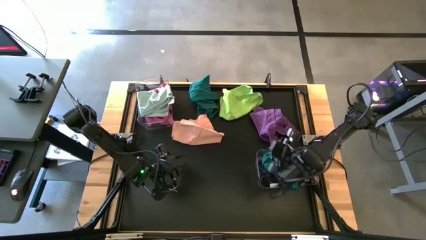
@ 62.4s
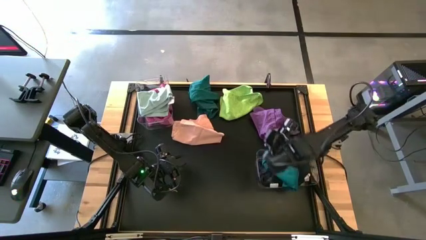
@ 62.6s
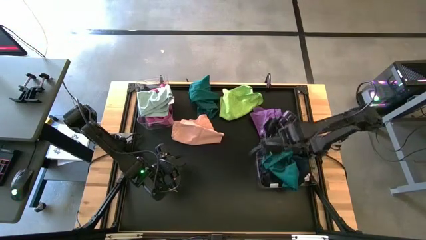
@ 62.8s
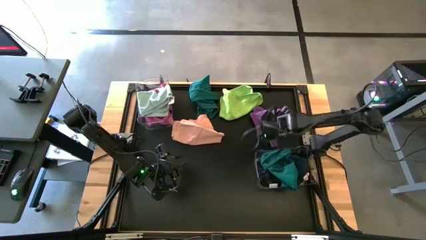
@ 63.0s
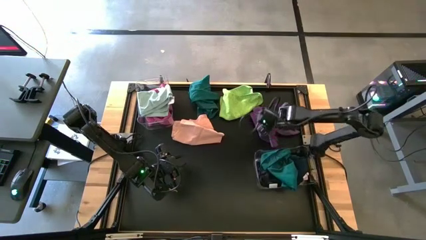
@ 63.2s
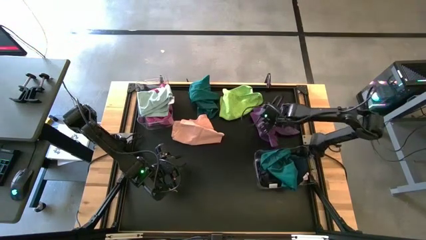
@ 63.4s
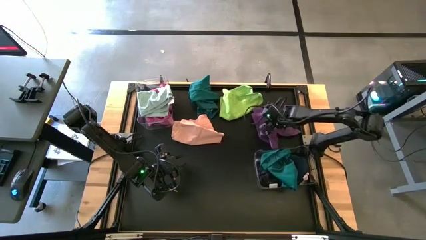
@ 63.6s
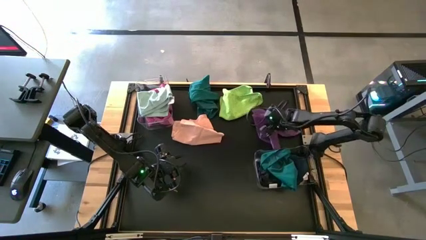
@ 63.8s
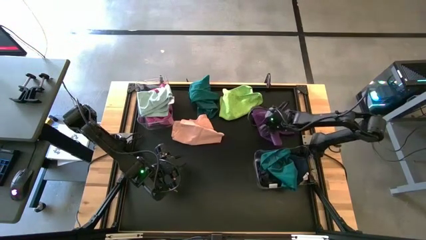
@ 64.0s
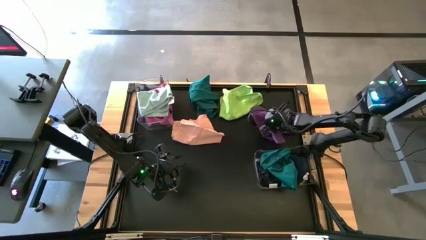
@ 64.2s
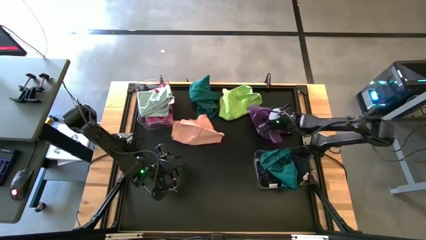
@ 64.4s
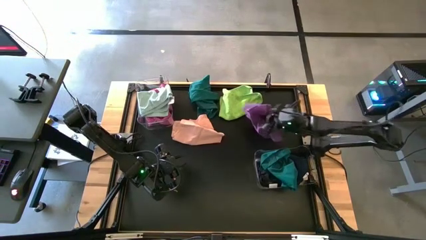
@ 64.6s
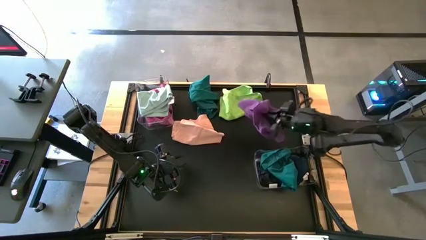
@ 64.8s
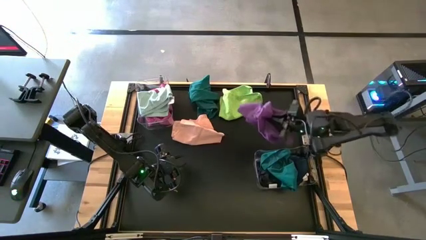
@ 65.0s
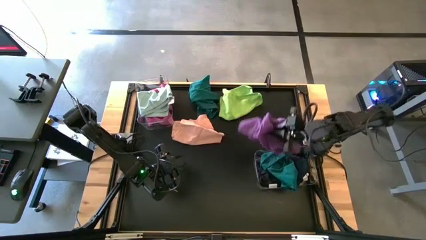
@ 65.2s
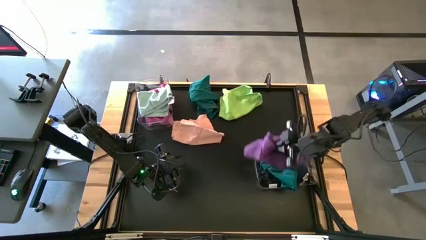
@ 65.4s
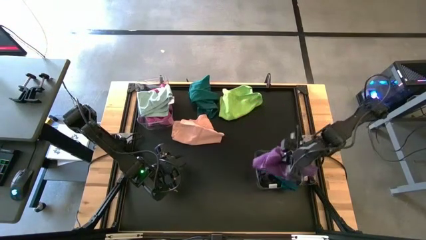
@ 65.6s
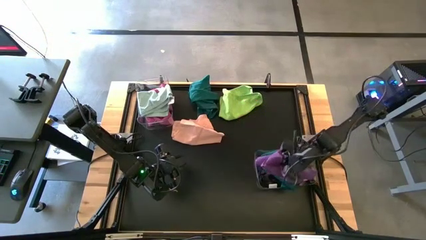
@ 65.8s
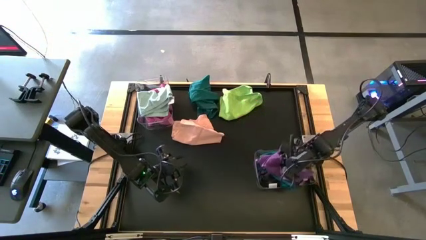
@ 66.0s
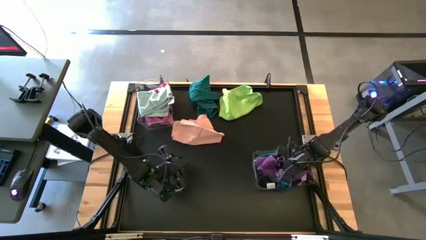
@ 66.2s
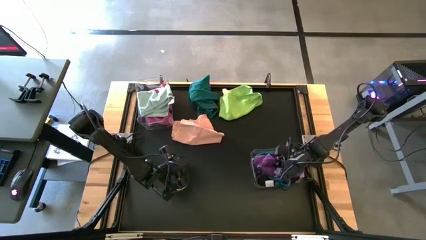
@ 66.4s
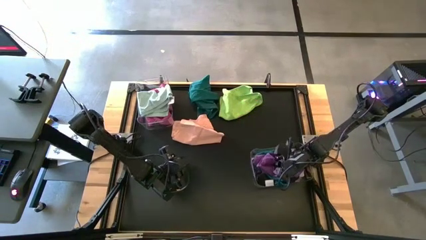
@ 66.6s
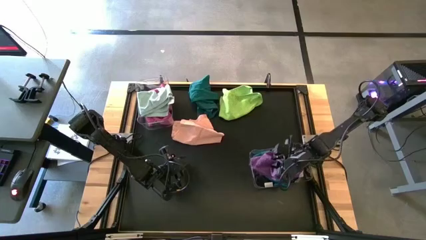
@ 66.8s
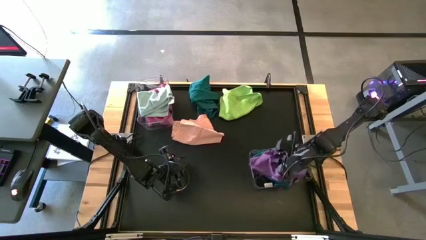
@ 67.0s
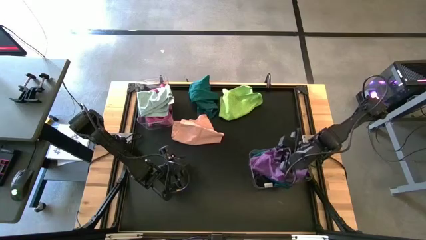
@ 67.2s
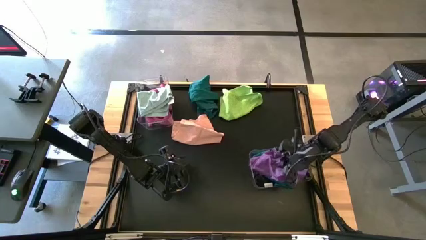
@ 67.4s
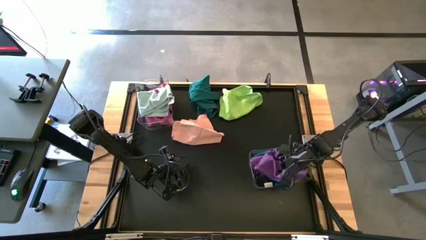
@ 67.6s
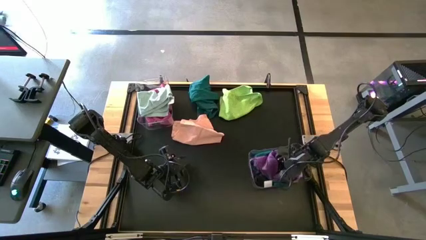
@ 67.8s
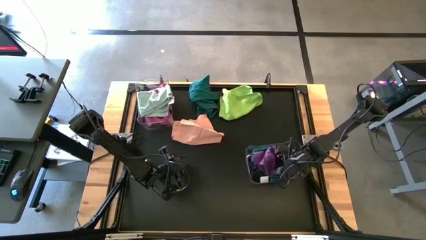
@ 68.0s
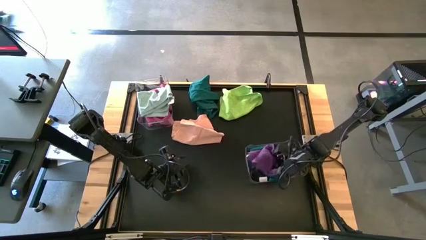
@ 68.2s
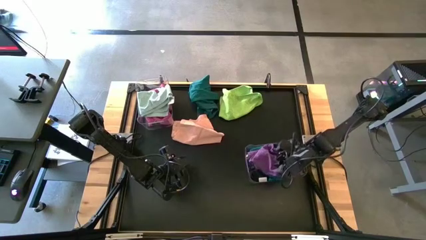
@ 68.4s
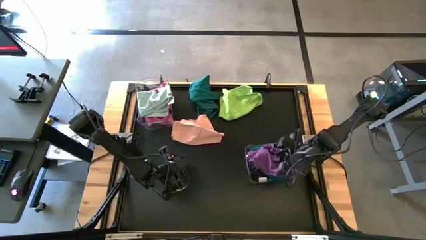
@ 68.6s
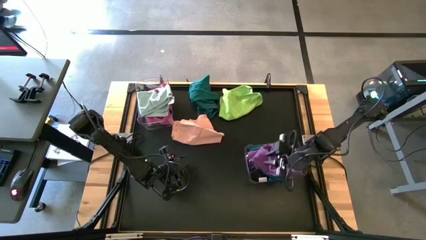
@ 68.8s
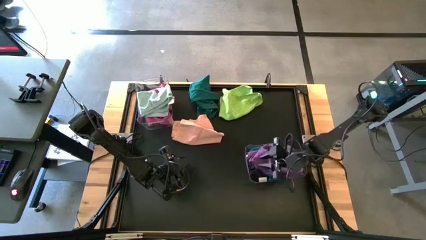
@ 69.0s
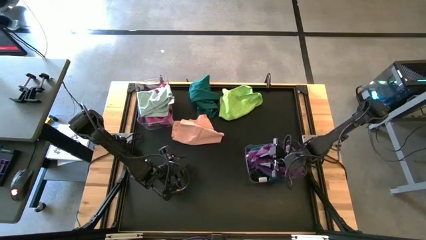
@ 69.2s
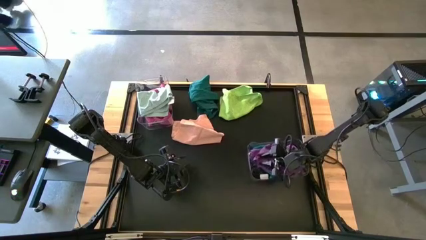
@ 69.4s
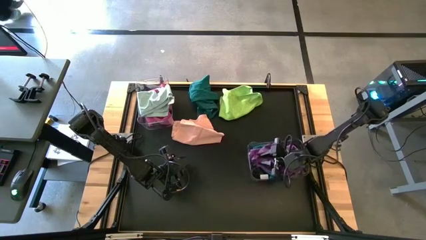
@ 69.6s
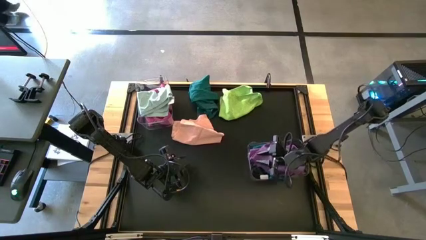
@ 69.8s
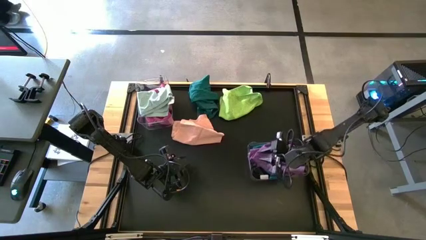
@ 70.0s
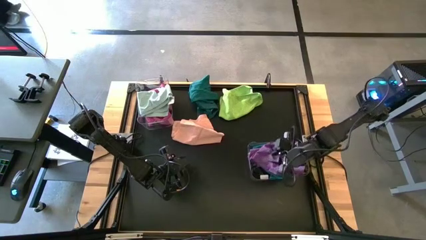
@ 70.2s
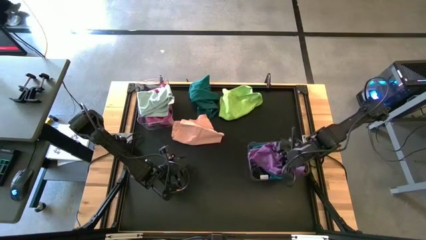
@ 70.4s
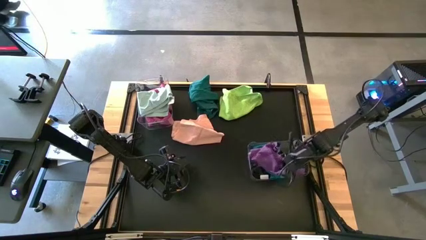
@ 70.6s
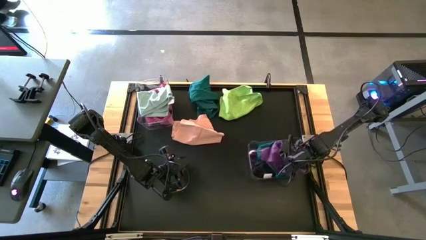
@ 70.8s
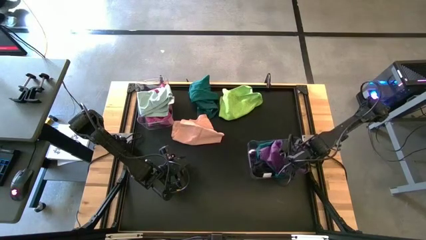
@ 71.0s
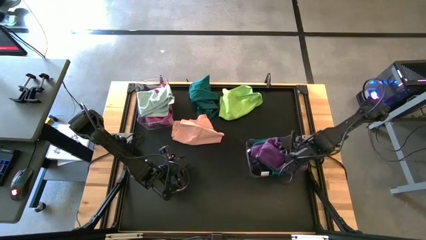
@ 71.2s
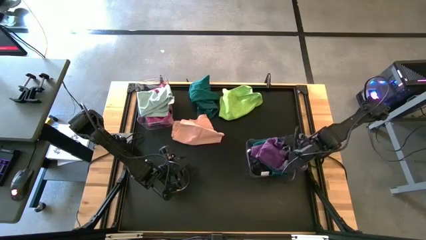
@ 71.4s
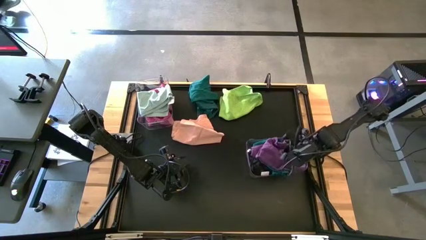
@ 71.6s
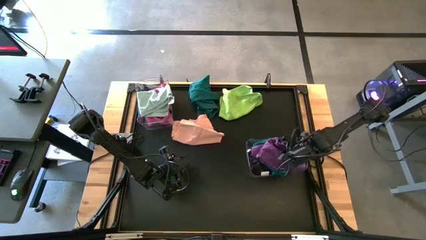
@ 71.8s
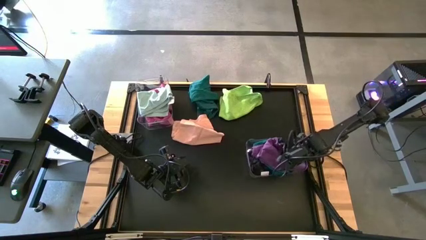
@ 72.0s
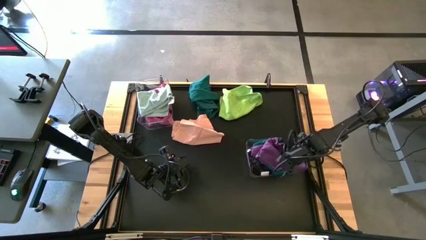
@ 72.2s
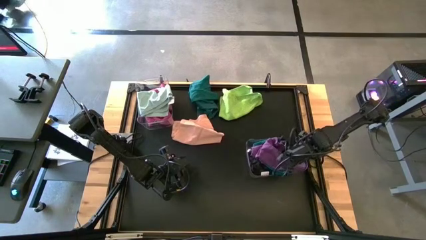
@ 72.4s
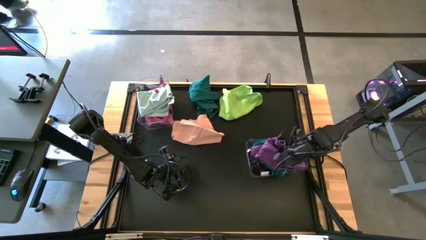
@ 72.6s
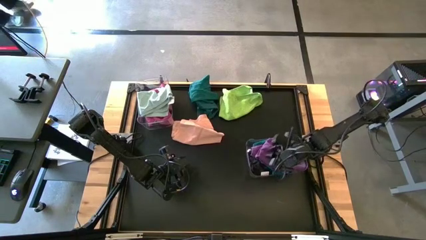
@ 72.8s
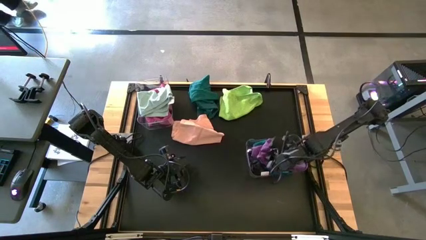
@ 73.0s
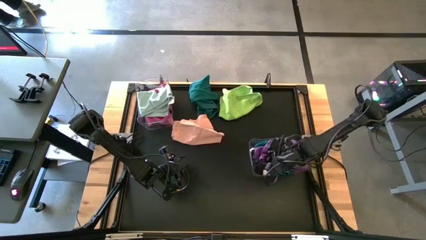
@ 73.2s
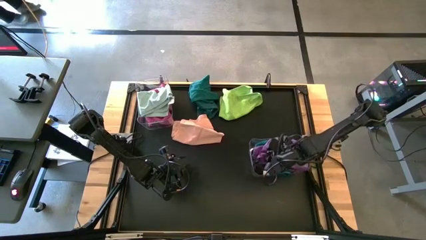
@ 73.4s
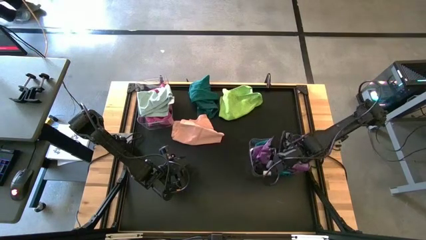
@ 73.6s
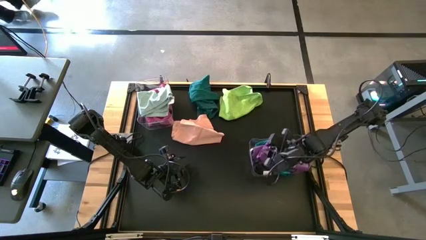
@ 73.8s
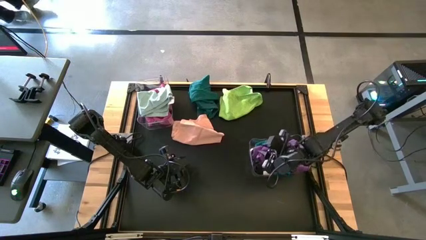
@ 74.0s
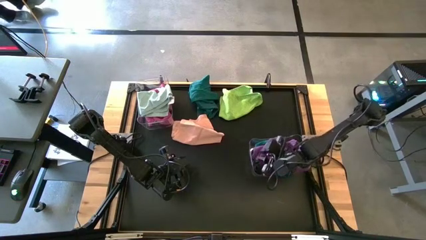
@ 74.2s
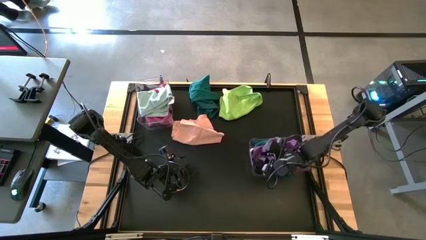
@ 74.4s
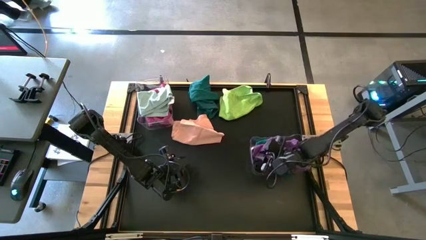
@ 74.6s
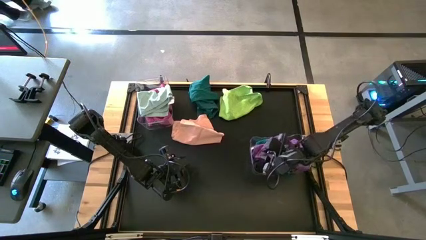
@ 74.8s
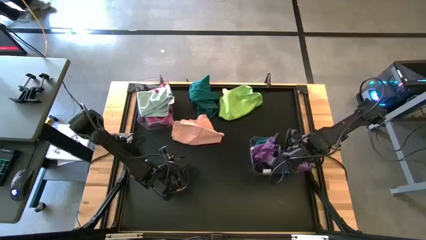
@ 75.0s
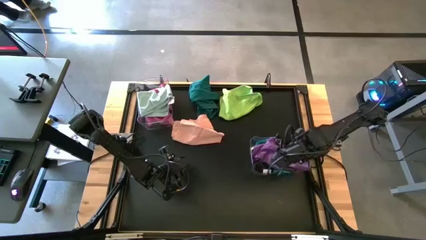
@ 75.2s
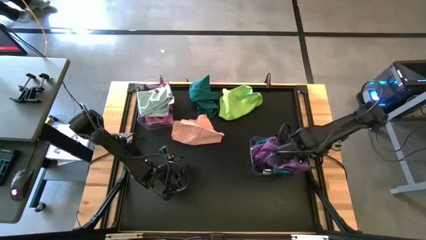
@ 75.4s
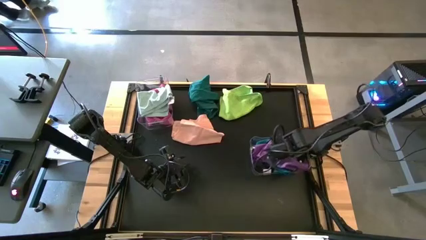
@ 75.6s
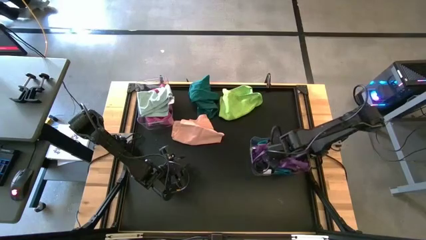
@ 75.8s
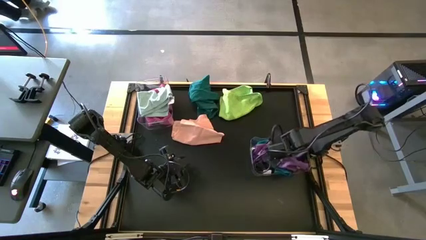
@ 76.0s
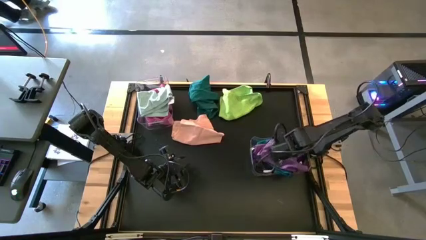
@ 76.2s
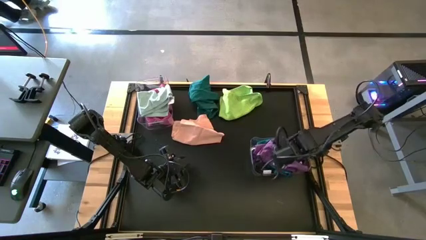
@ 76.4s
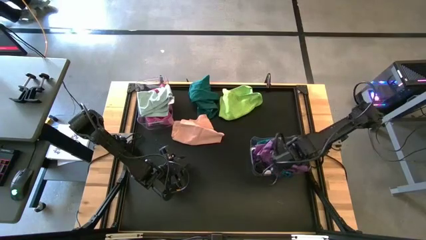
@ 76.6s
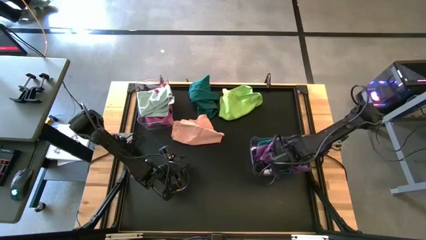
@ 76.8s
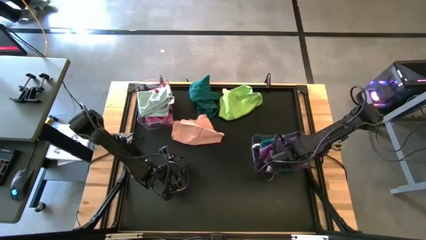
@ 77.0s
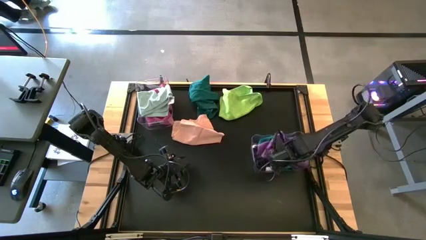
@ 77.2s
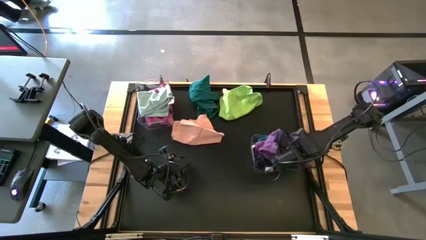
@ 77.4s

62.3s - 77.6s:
Task: Sort towels by color in basket
Put the purple towel into the right transparent bin
